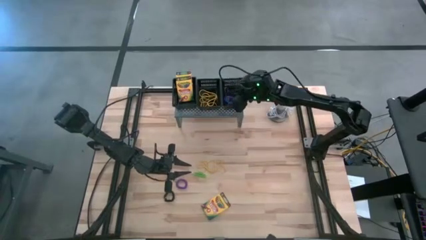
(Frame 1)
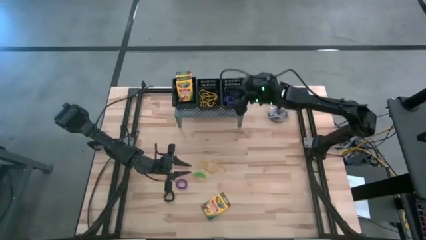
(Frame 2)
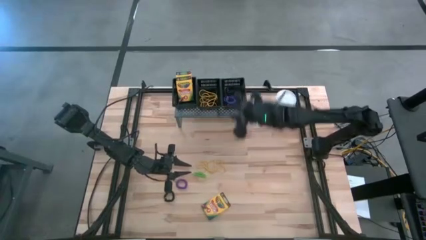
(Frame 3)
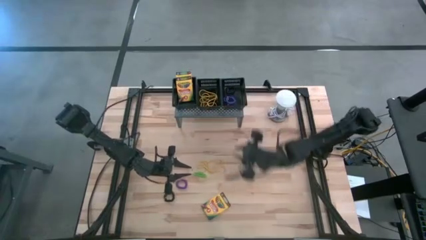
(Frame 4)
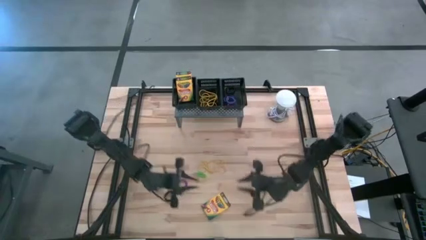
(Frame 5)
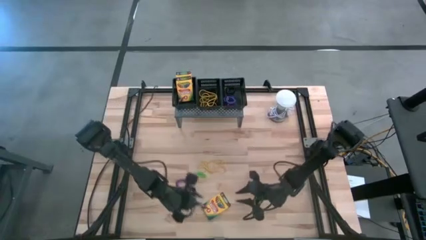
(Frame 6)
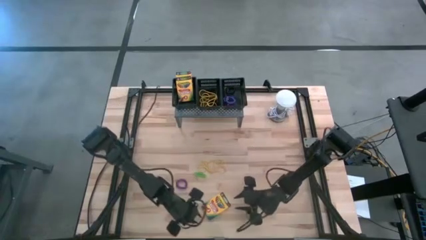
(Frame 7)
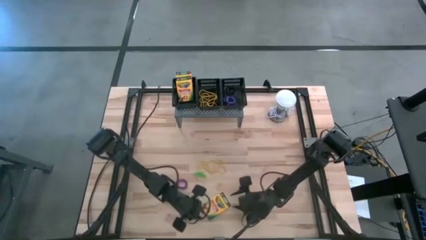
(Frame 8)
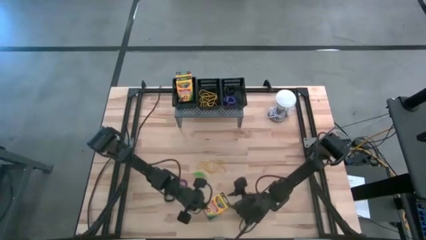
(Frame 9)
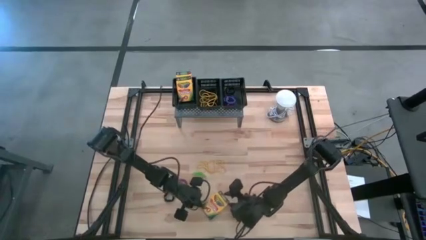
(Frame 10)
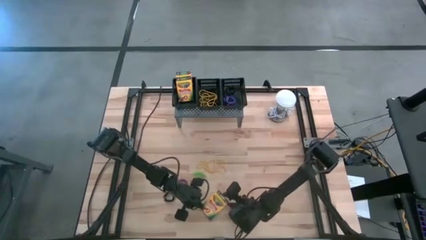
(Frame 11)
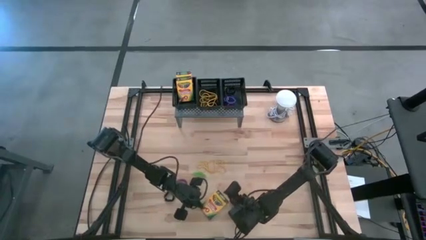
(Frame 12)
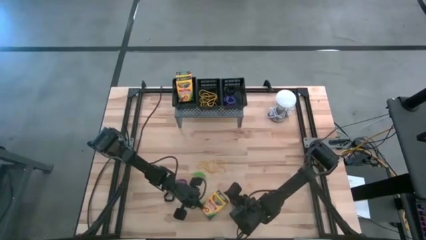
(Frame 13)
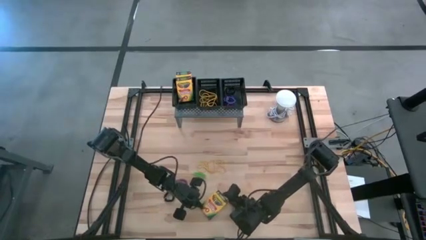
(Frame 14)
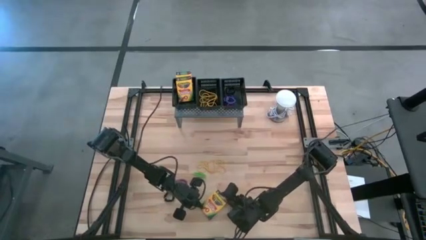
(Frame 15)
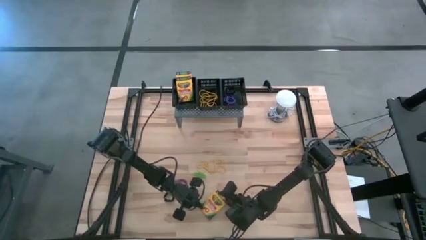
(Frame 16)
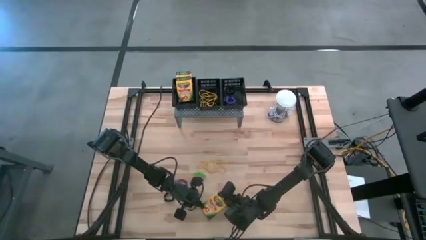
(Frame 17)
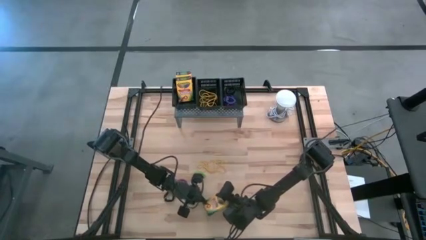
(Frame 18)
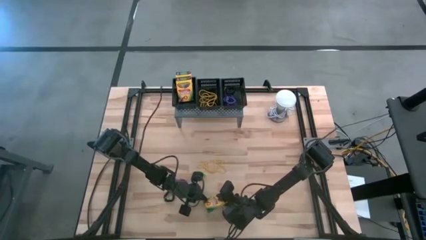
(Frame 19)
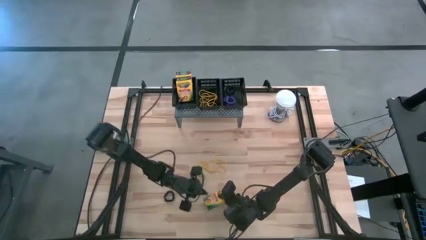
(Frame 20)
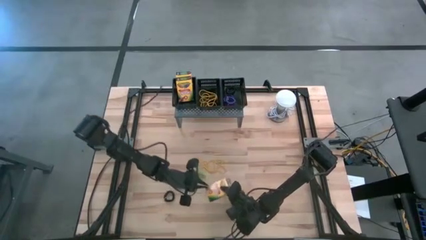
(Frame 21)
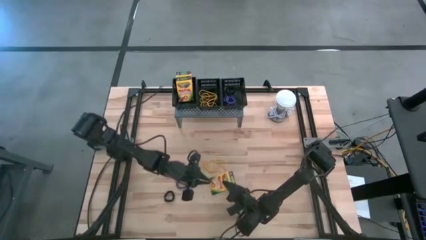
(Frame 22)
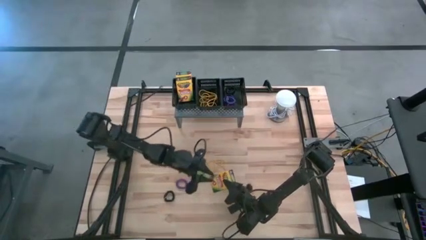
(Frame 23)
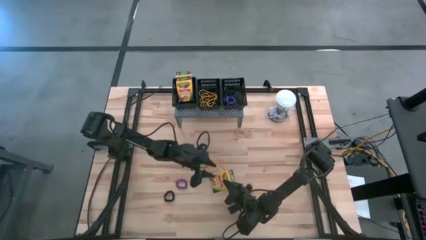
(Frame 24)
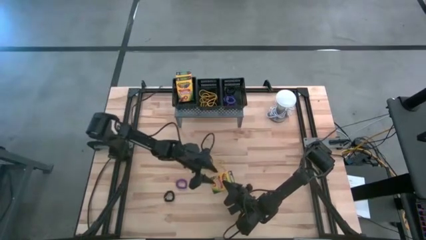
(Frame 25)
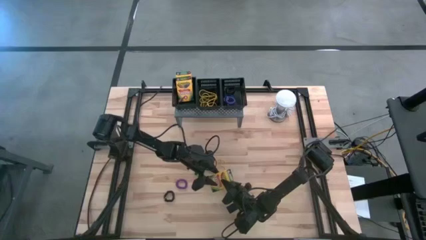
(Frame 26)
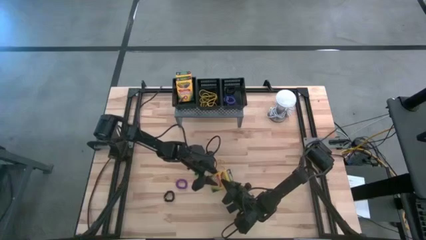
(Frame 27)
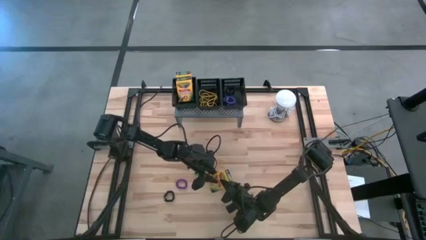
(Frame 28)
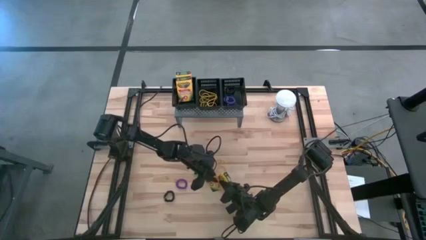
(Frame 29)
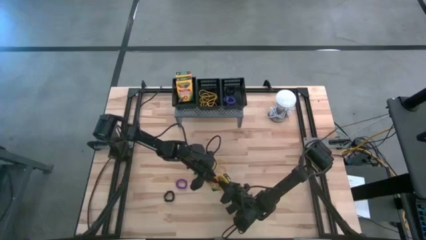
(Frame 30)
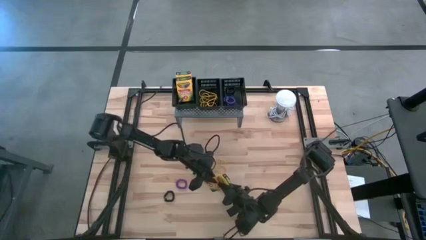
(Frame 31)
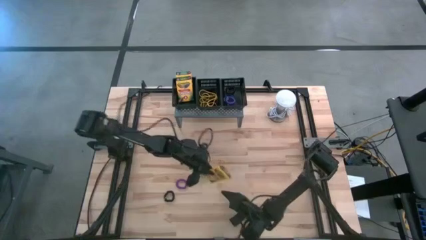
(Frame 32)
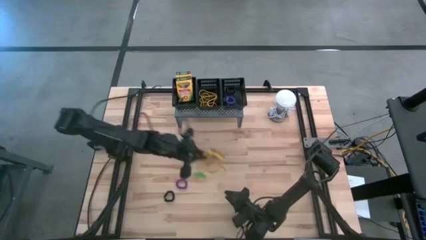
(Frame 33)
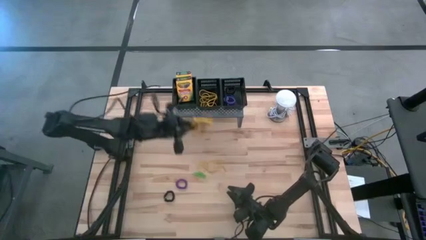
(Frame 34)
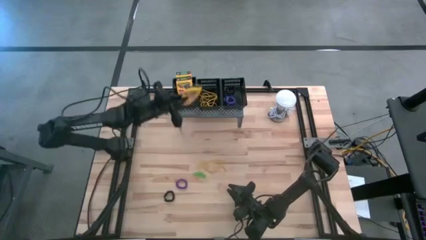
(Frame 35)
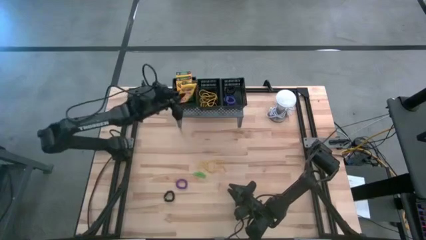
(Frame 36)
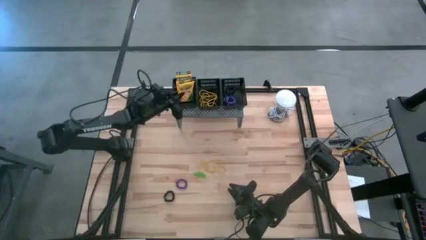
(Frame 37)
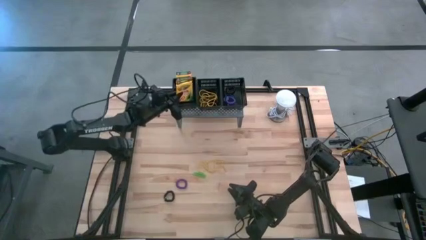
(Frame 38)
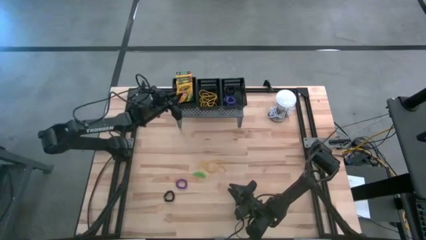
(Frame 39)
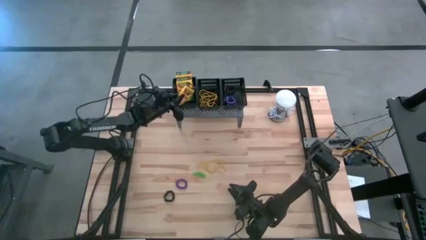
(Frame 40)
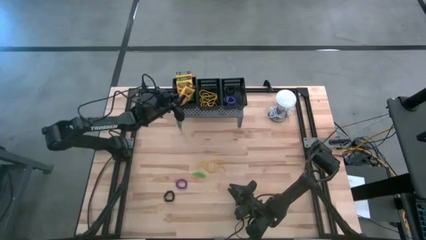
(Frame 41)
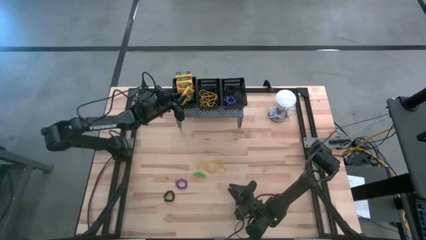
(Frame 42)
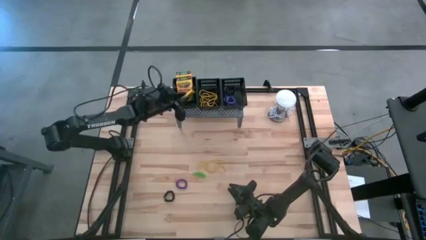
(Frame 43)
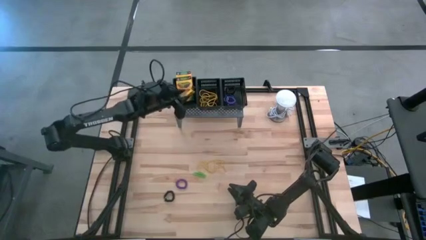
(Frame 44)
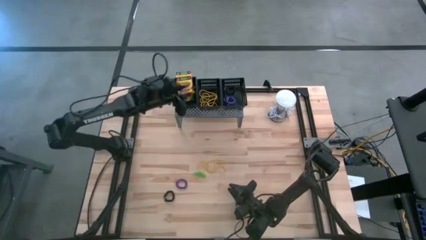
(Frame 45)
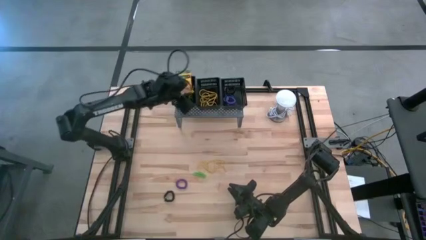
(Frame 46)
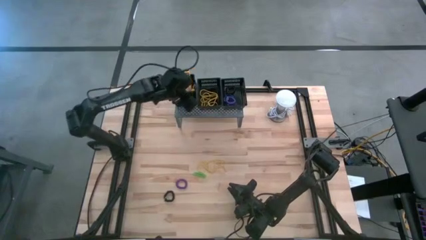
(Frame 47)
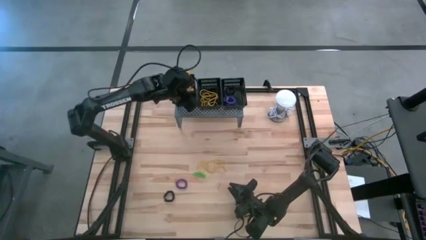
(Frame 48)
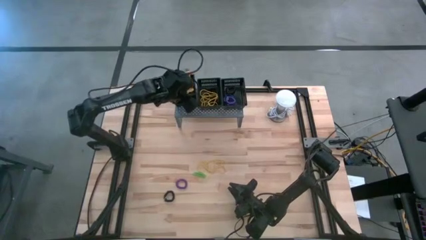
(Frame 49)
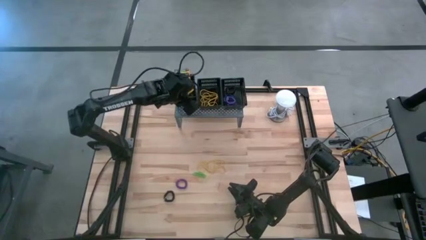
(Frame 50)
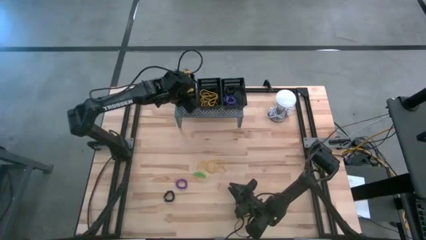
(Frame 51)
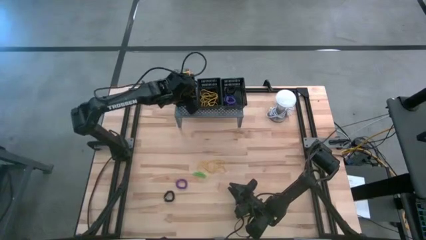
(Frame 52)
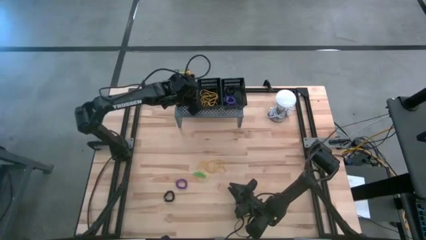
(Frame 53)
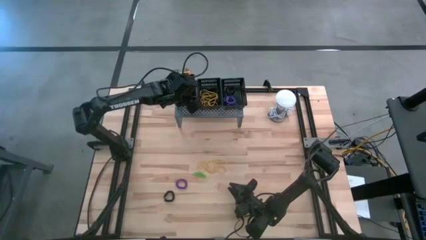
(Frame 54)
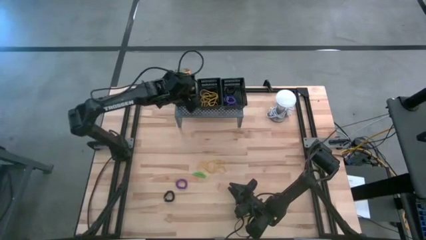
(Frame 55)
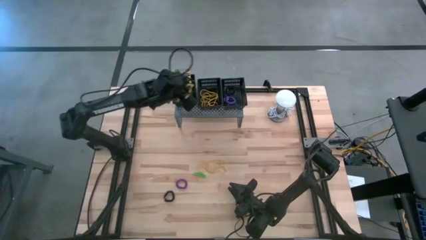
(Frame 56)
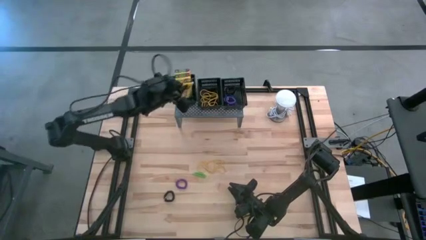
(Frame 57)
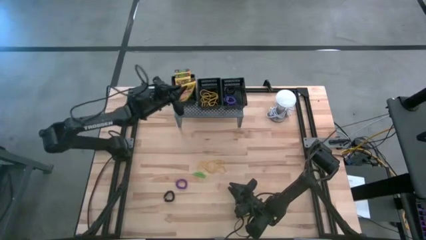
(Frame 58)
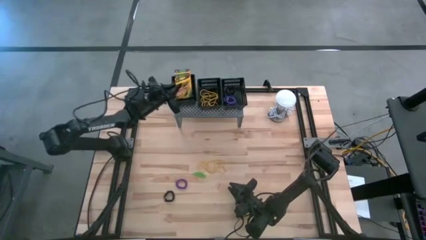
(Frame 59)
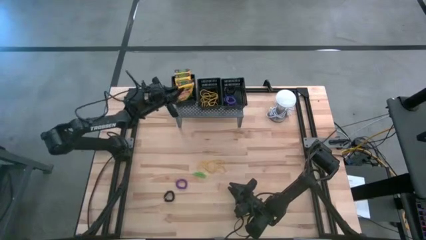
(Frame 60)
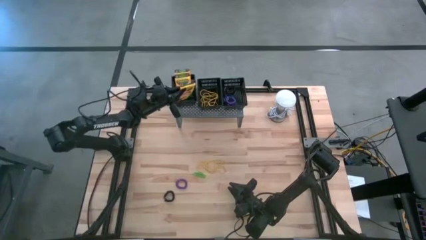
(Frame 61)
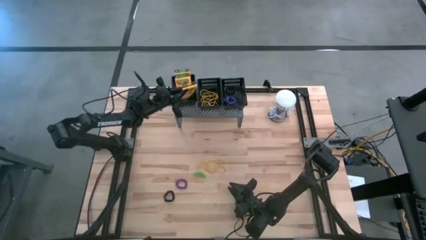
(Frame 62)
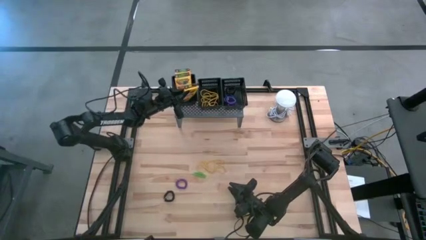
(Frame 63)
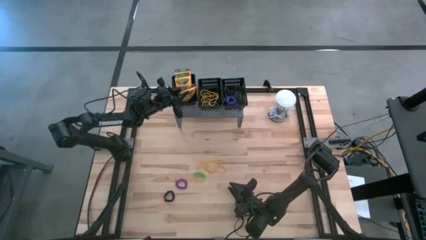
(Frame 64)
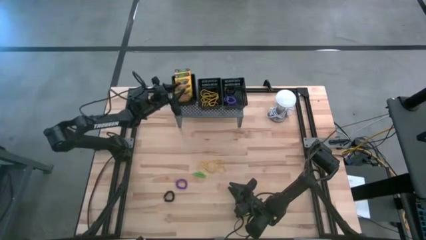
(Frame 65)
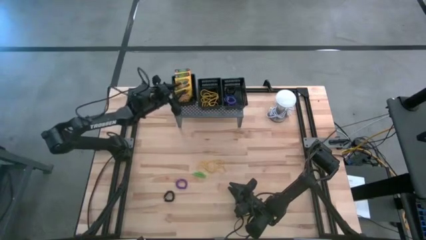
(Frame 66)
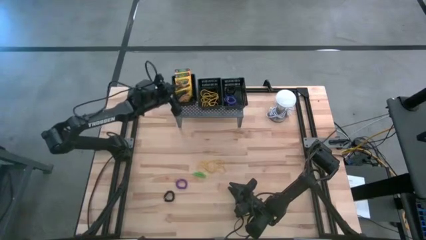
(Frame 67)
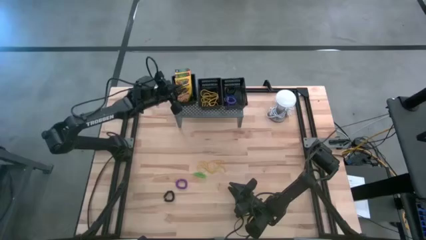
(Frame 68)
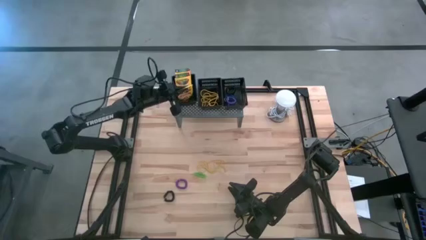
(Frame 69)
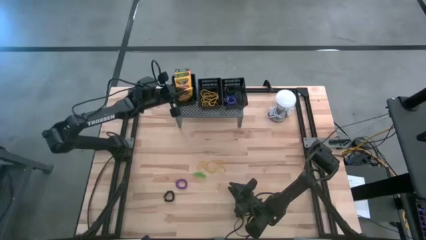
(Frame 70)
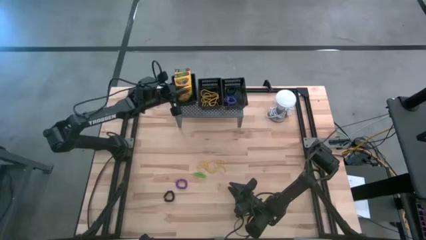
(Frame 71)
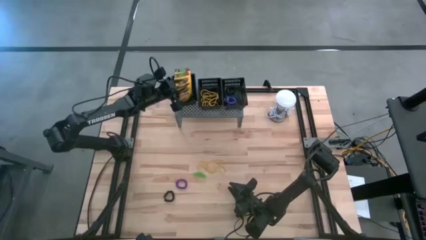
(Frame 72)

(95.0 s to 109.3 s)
Task: Pick & Place Office Desk Supplies
Put the yellow crayon box in the left black bin on the shelf

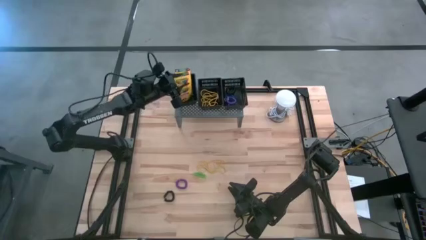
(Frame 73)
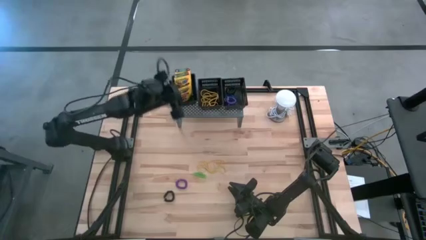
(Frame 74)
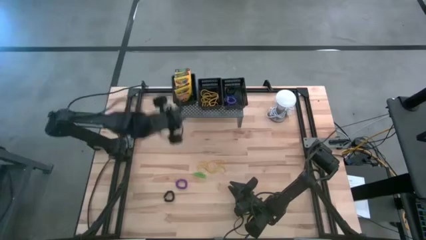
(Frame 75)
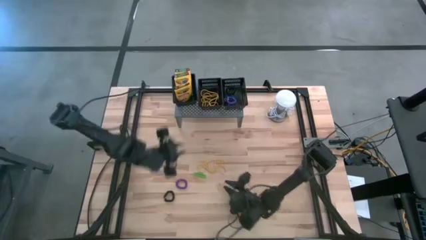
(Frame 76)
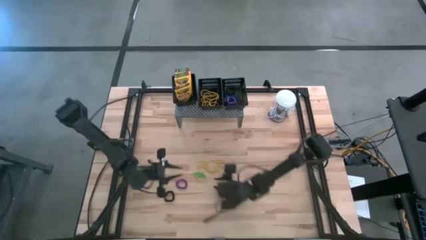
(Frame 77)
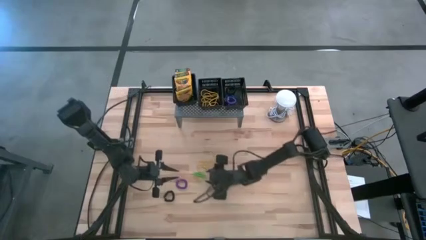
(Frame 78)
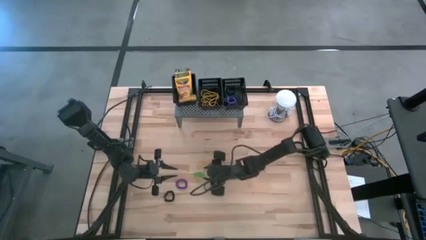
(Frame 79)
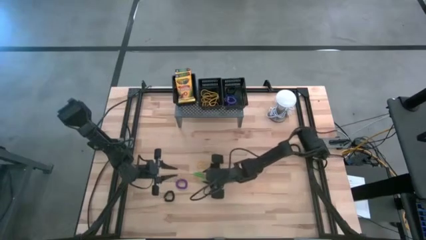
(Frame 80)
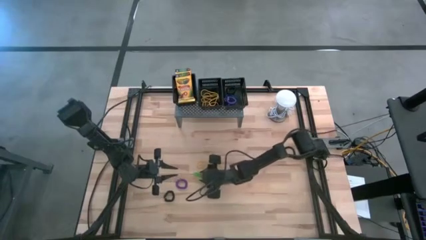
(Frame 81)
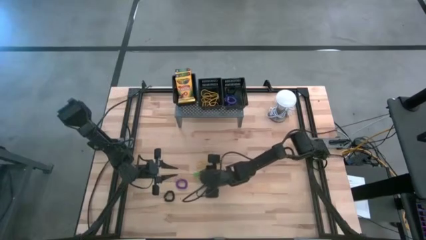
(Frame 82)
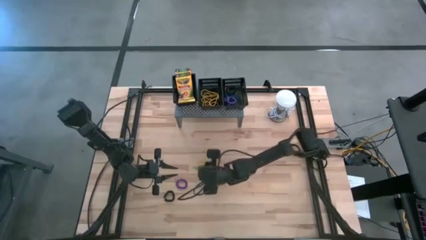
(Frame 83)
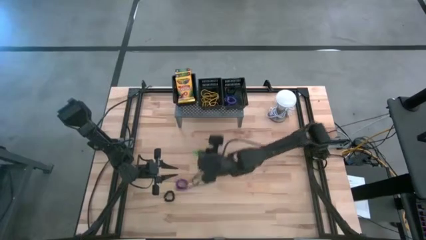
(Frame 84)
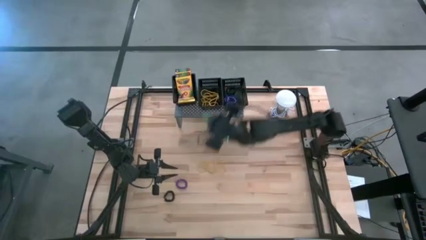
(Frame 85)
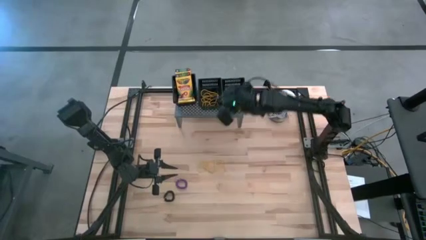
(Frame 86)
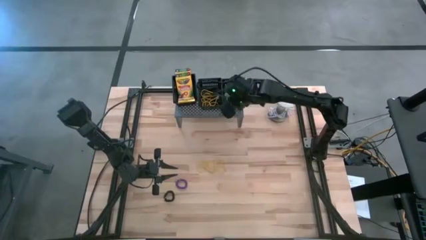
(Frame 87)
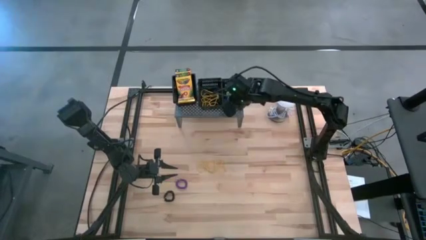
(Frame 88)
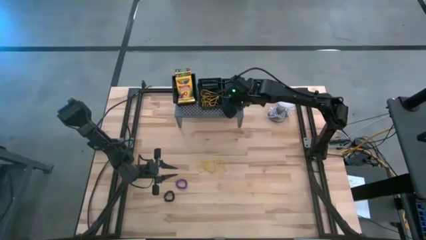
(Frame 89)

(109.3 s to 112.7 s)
Put the green spring keychain in the right black bin on the shelf
